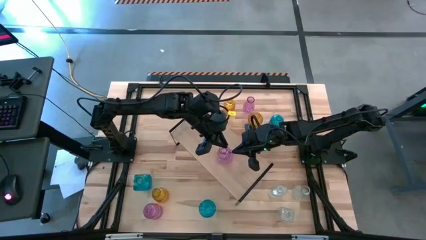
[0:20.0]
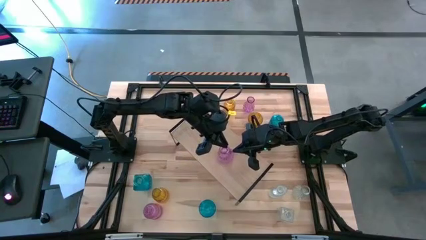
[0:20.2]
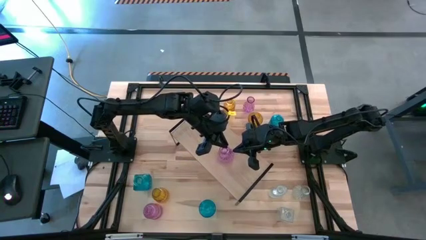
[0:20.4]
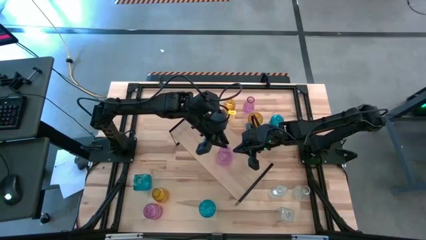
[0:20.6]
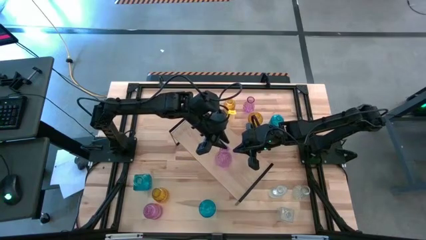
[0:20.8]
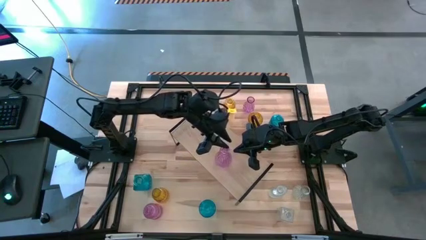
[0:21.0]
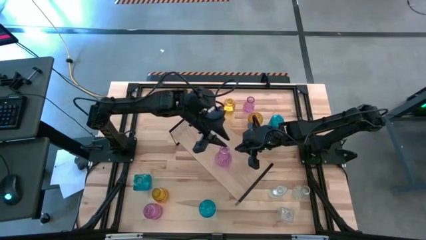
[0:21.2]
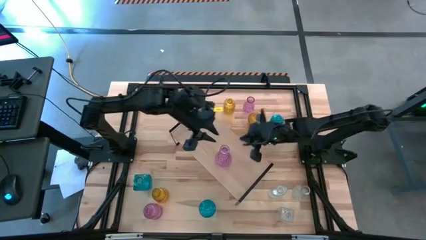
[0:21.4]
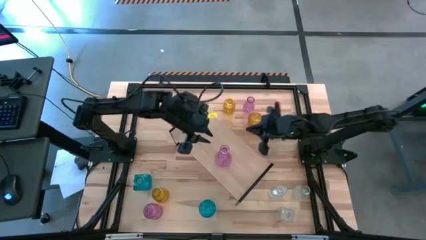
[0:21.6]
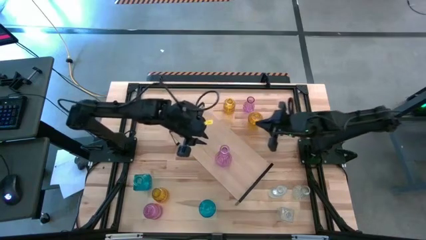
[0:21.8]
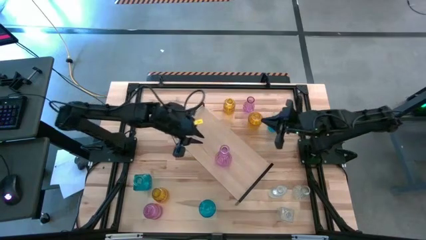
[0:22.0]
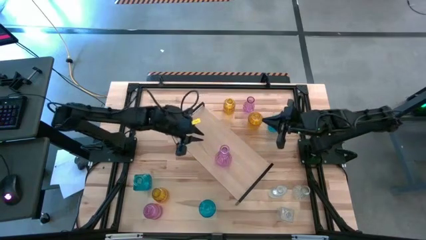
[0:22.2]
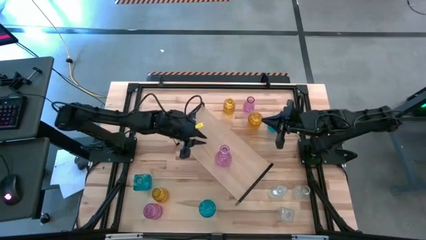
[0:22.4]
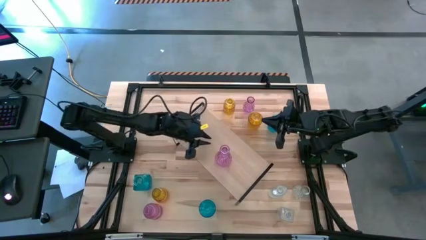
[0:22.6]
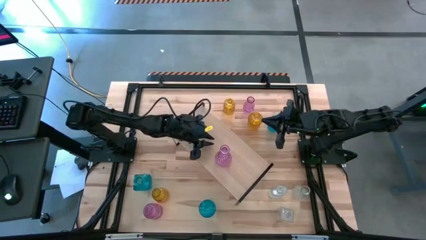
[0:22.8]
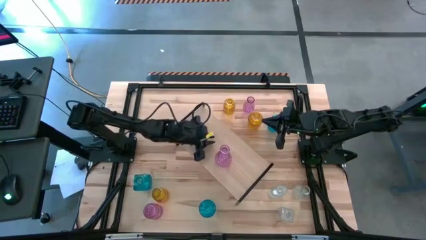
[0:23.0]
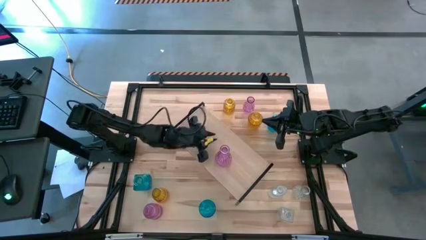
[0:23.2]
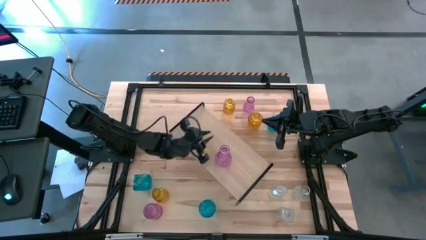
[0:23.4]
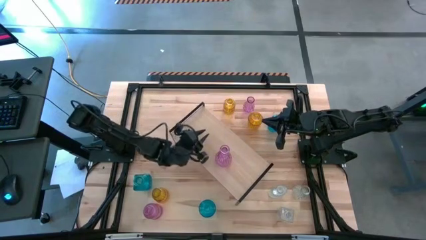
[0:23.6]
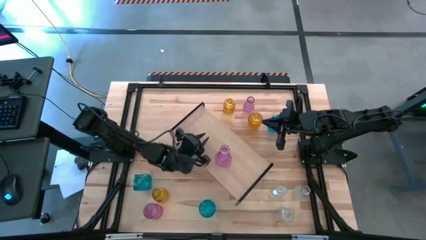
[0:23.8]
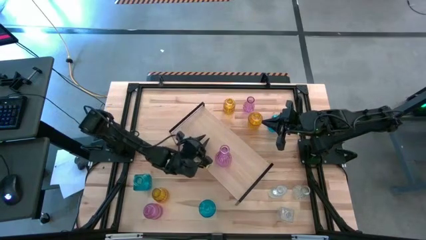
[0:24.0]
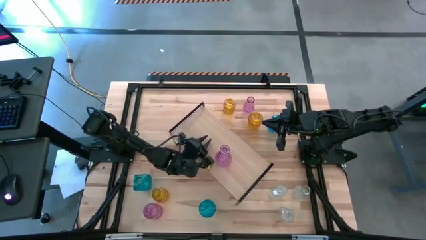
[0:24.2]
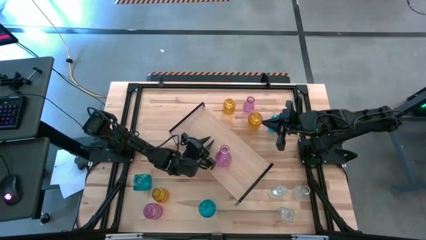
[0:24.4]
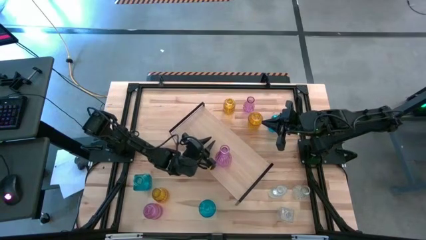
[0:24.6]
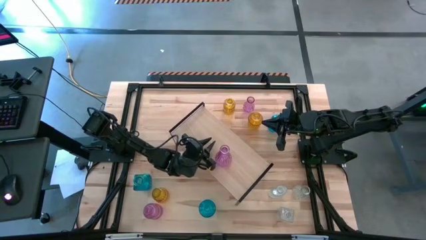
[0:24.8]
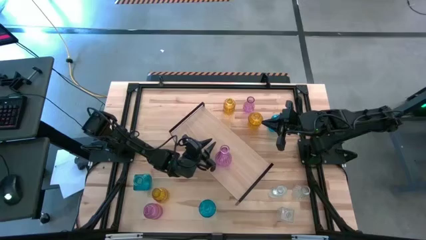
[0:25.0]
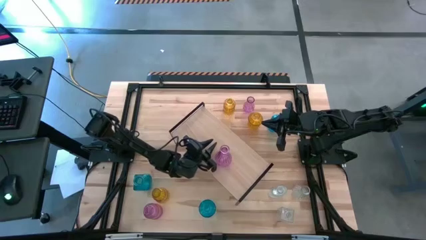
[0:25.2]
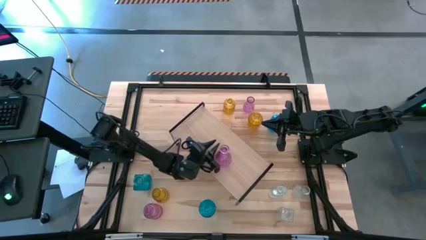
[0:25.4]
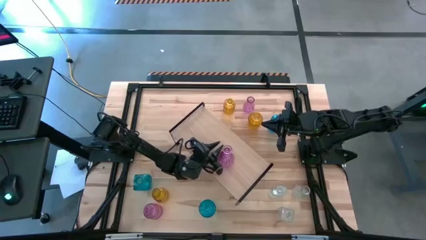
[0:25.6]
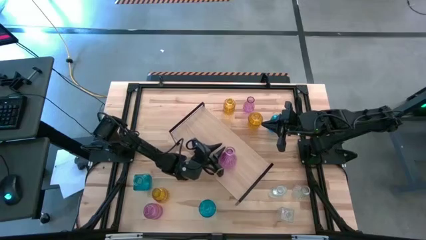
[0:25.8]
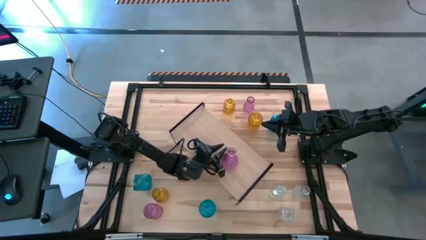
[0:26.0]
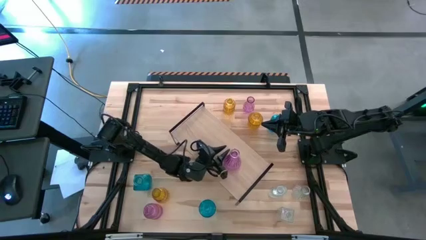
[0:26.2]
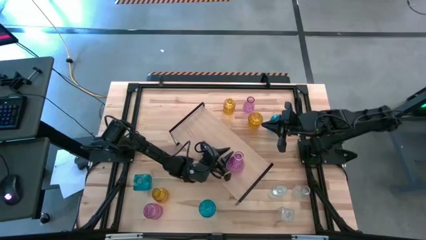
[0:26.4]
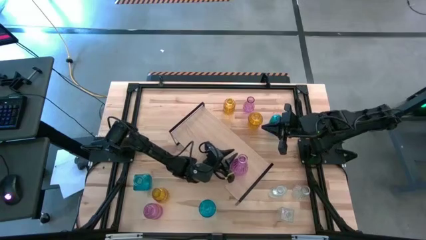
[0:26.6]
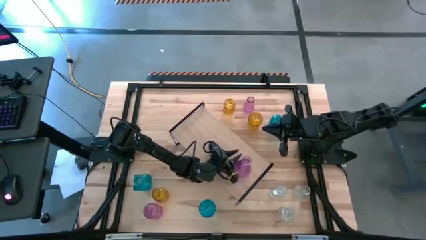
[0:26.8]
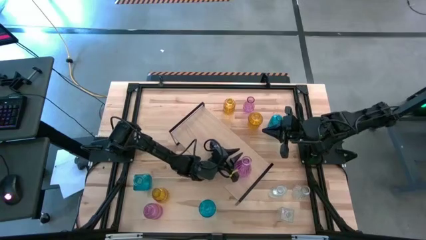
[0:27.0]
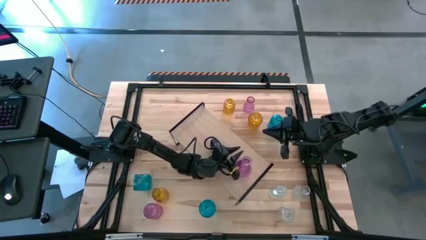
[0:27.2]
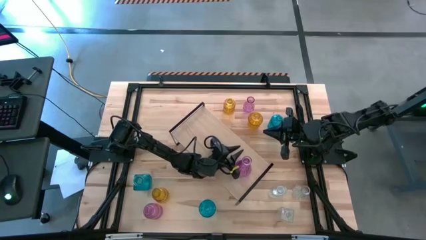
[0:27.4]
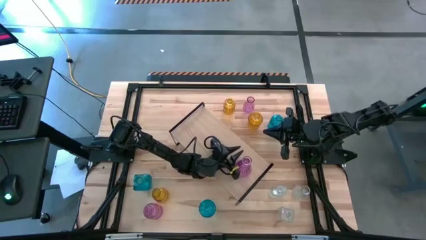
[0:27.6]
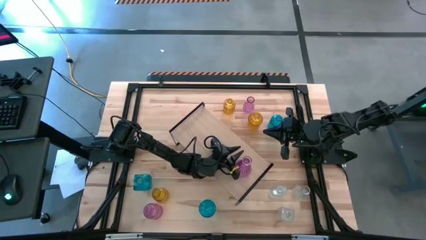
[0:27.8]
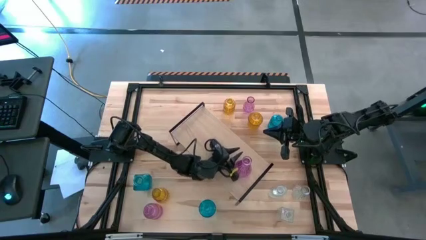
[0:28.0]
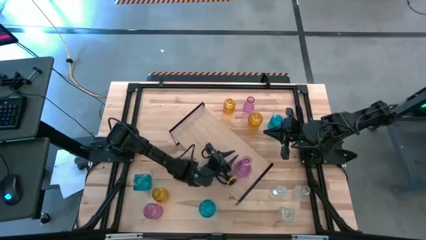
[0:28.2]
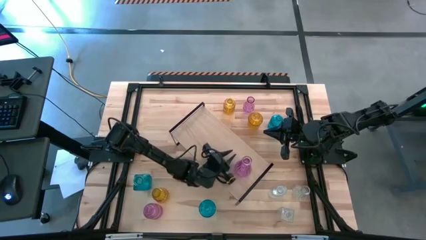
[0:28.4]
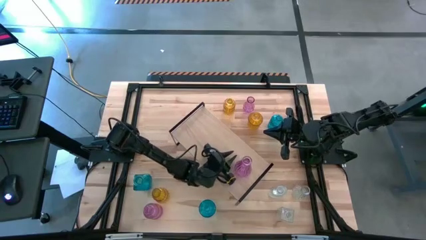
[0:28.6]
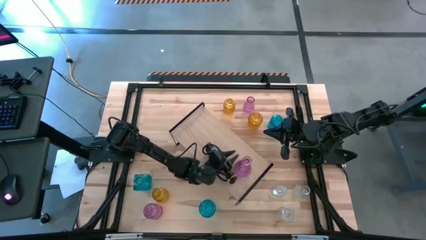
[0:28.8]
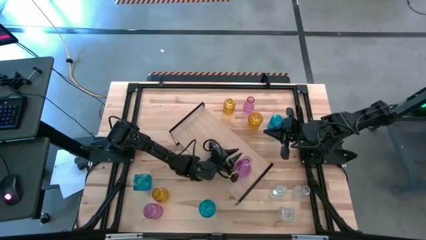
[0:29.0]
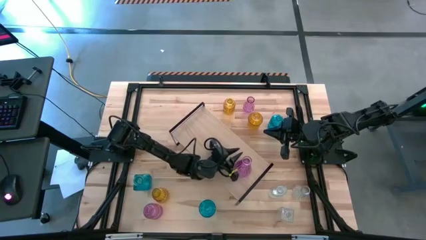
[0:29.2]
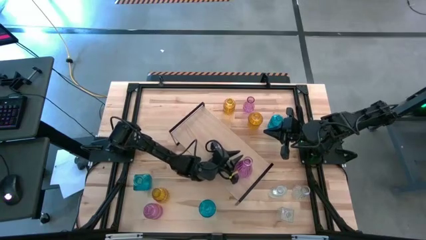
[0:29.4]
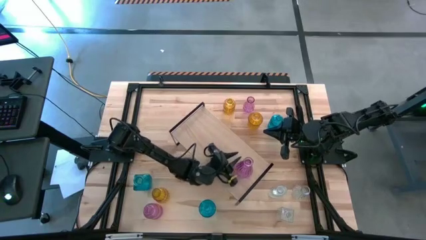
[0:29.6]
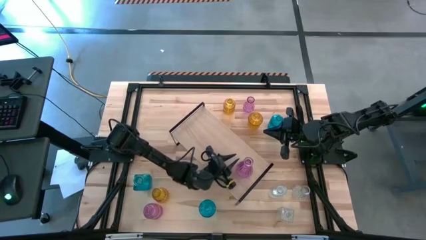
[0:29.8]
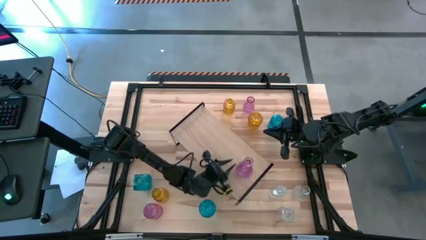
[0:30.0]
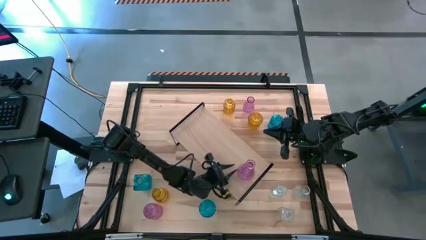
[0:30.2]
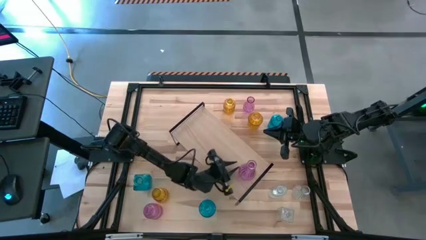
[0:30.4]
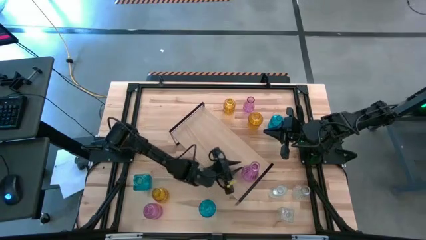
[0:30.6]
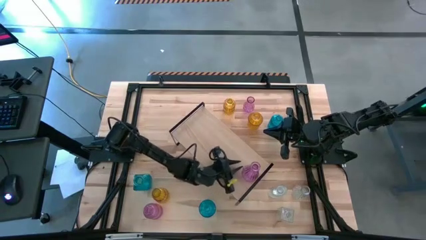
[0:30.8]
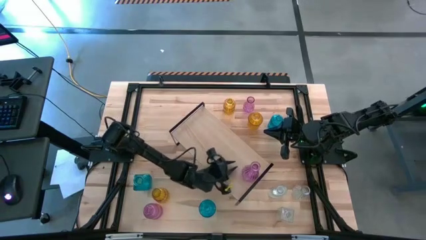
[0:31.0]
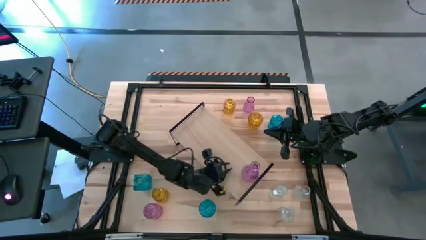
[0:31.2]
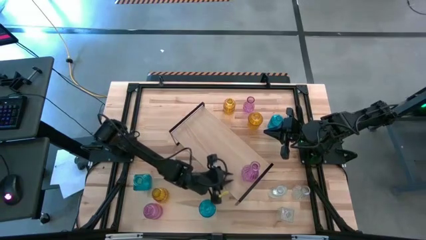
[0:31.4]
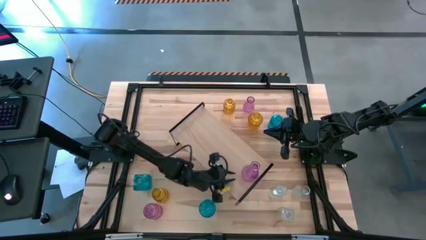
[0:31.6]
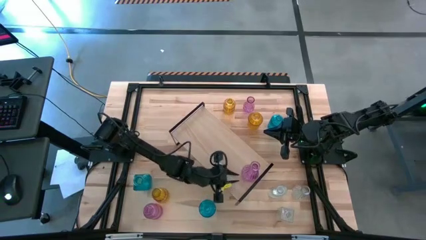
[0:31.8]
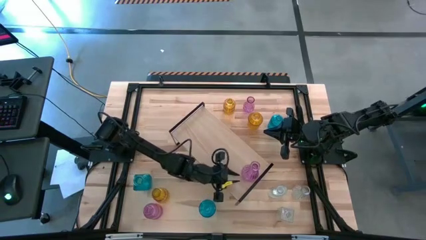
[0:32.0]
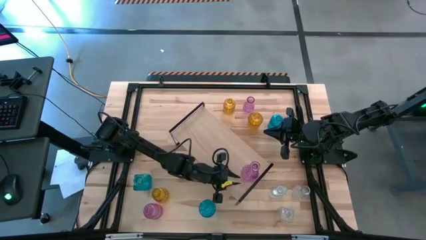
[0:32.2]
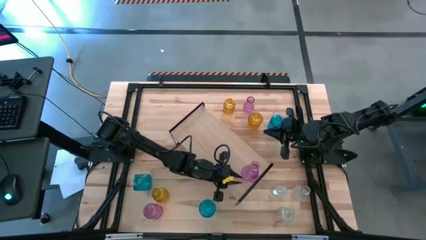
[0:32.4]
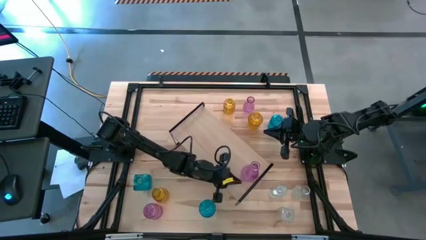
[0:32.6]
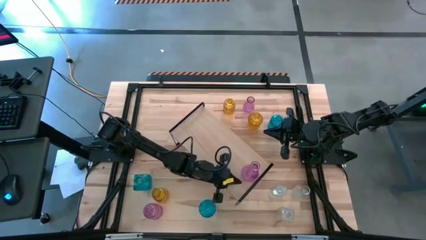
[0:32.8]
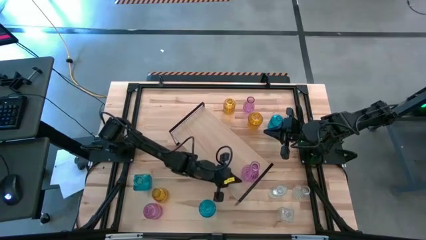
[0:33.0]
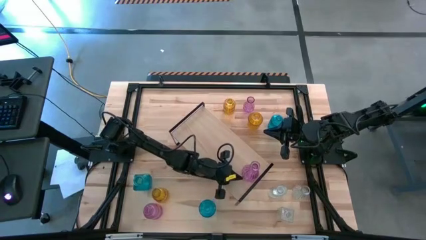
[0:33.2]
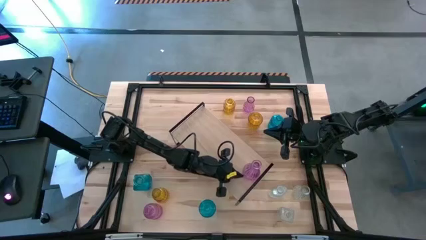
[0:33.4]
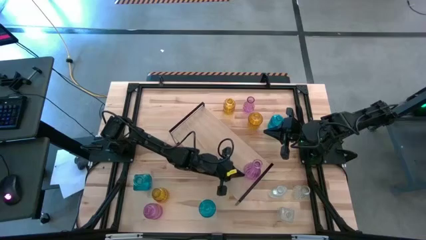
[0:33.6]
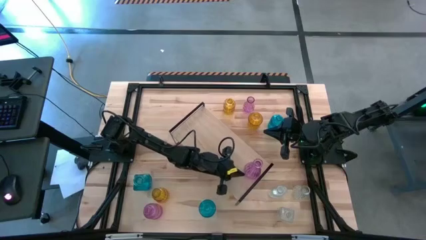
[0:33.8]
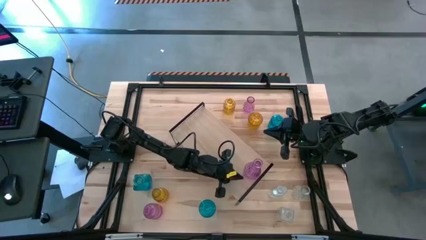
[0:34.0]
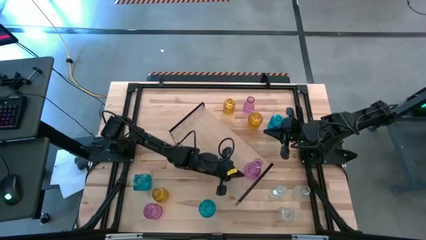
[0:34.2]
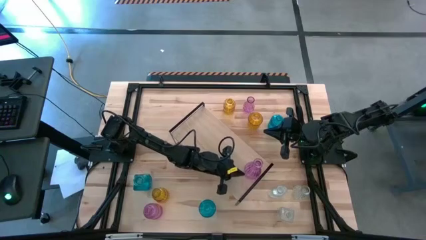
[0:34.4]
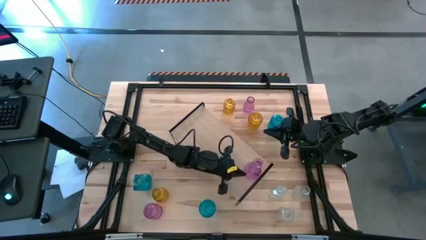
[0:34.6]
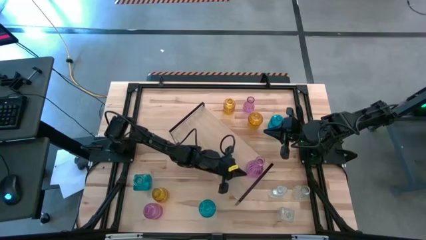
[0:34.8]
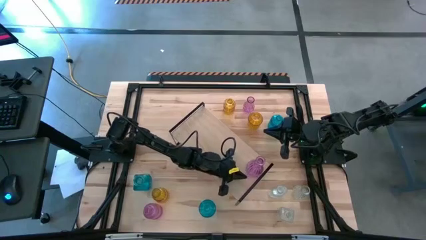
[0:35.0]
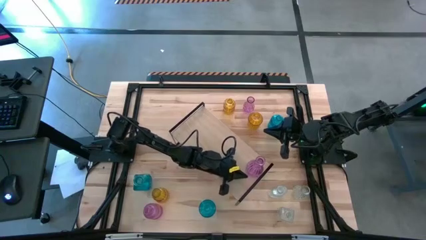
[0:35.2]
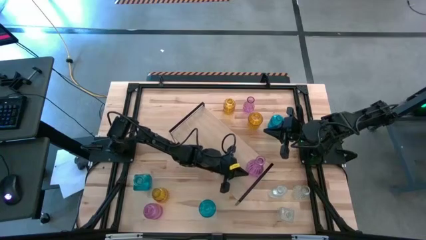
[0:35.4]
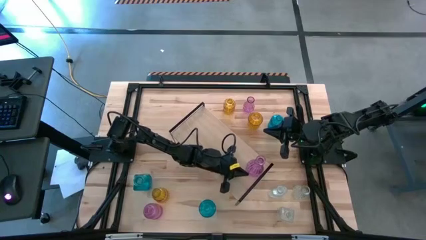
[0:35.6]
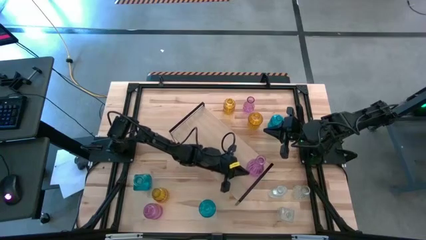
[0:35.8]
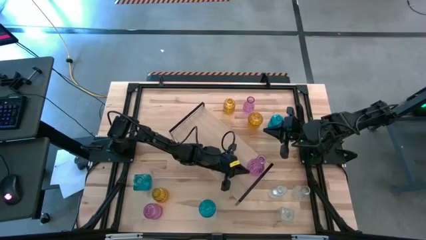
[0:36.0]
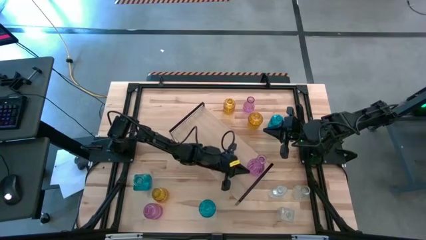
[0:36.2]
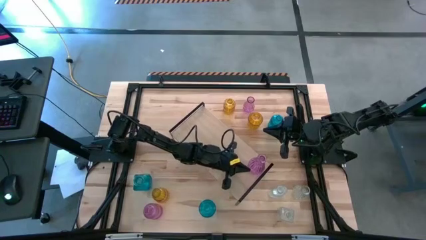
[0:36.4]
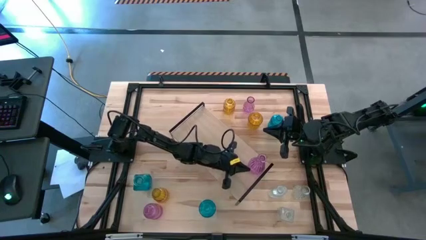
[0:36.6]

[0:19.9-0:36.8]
Task: sort vases onto shelf
Put the middle pink flower vase on the shelf
